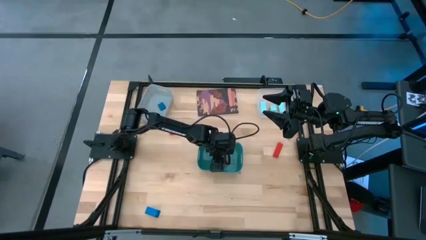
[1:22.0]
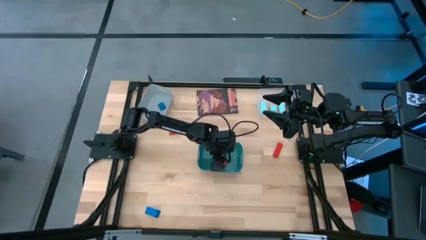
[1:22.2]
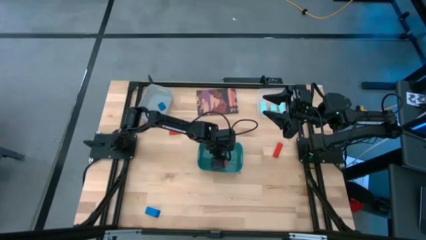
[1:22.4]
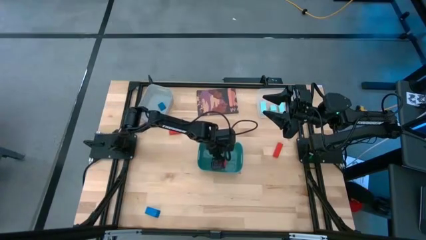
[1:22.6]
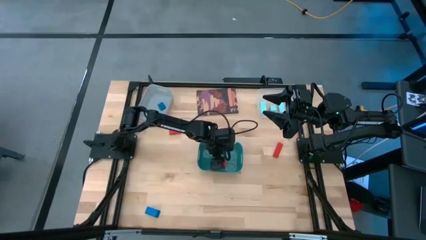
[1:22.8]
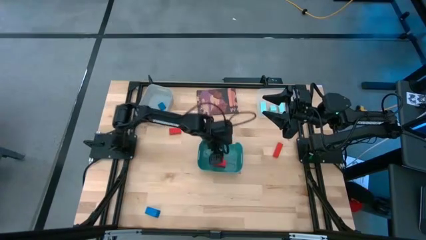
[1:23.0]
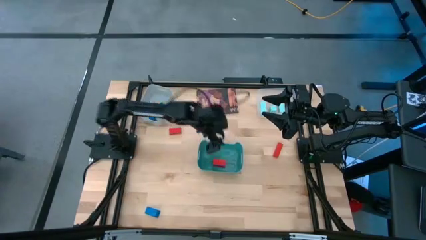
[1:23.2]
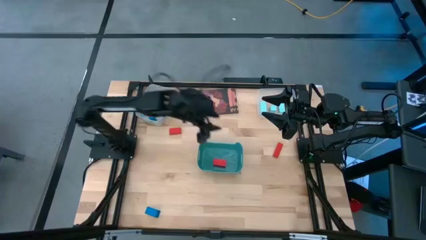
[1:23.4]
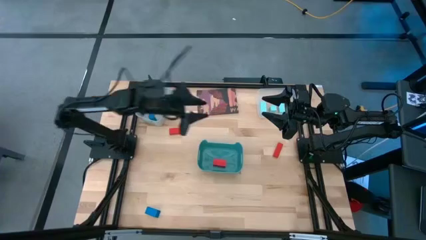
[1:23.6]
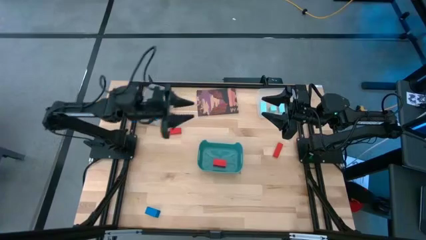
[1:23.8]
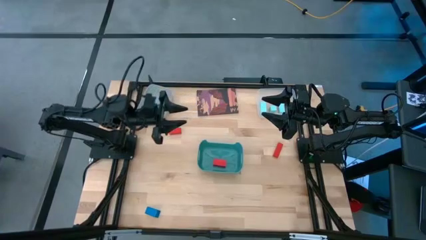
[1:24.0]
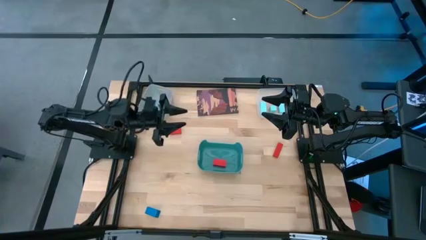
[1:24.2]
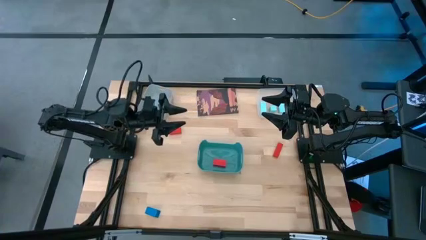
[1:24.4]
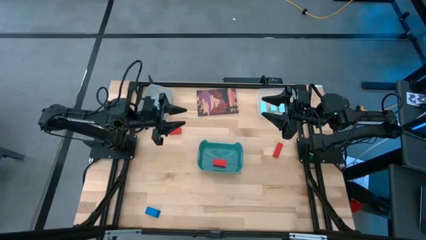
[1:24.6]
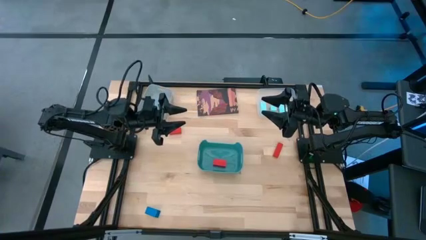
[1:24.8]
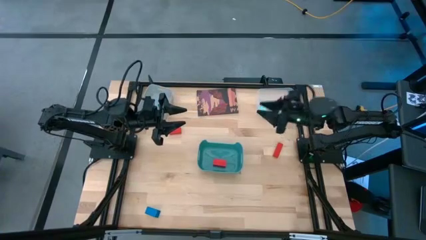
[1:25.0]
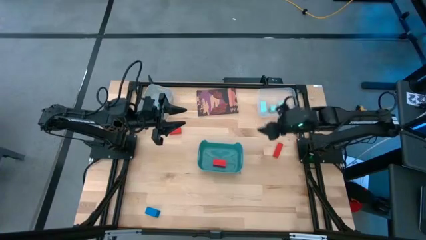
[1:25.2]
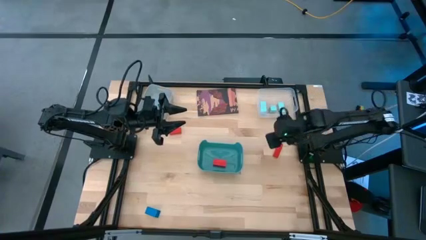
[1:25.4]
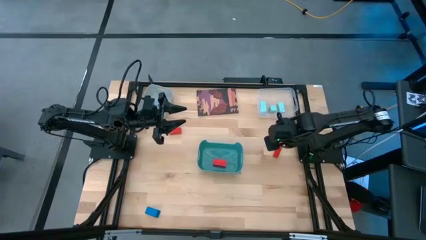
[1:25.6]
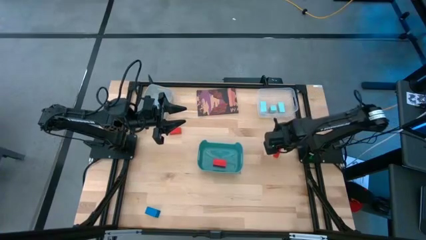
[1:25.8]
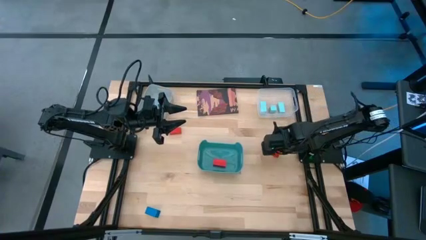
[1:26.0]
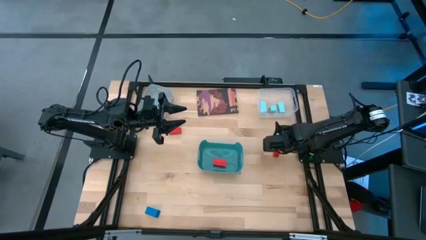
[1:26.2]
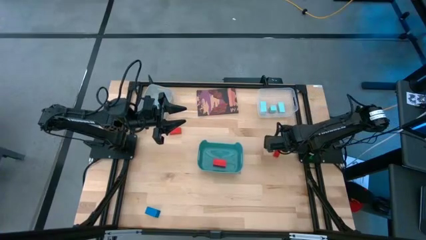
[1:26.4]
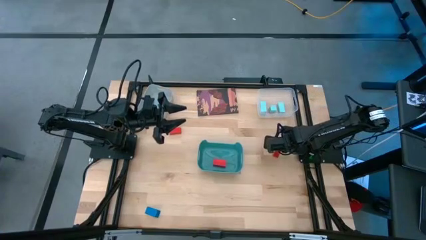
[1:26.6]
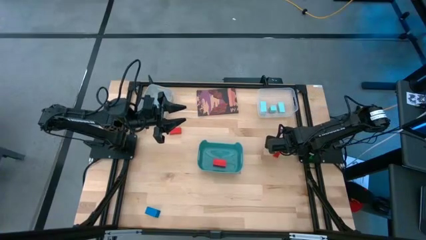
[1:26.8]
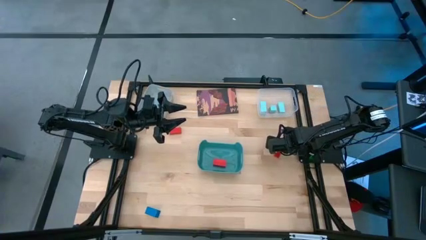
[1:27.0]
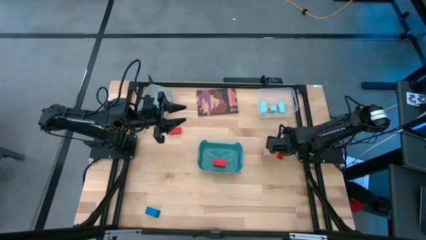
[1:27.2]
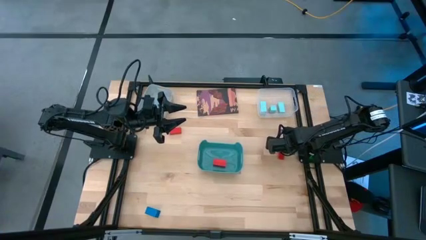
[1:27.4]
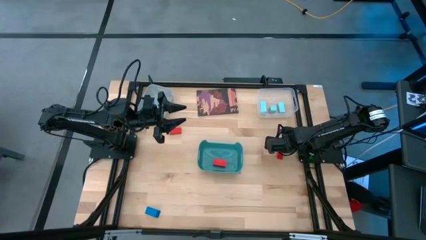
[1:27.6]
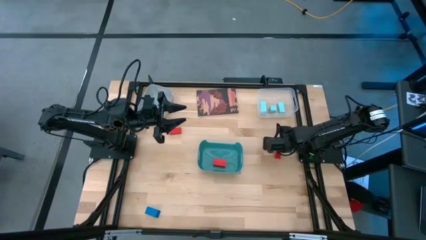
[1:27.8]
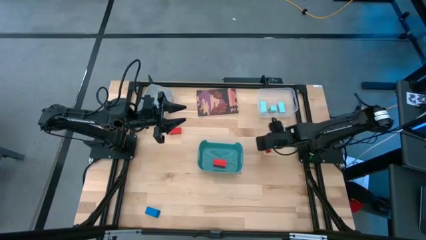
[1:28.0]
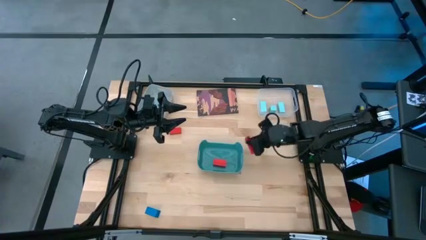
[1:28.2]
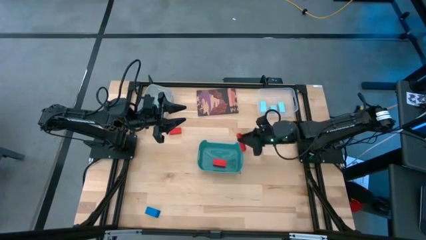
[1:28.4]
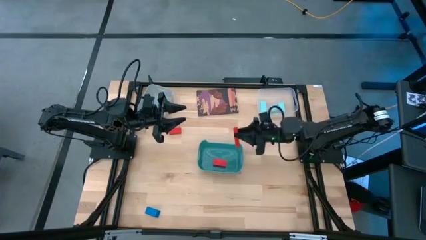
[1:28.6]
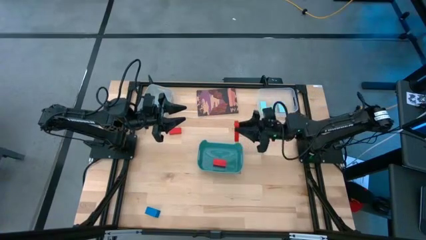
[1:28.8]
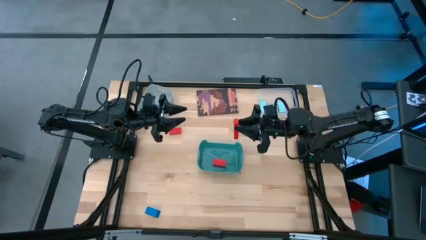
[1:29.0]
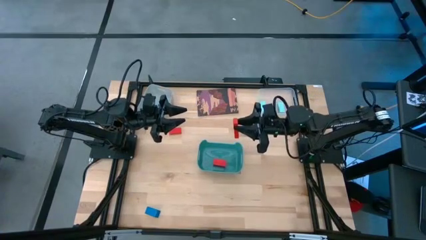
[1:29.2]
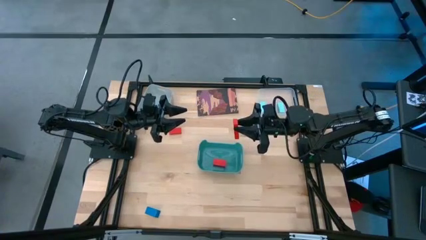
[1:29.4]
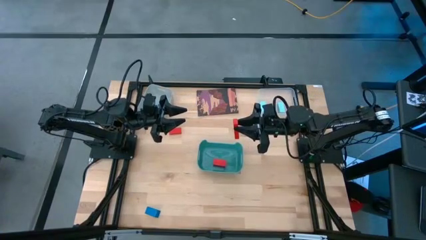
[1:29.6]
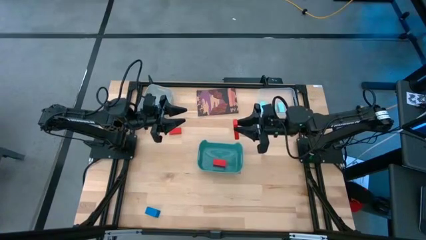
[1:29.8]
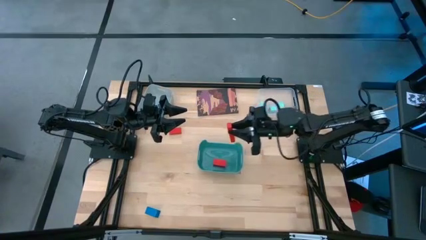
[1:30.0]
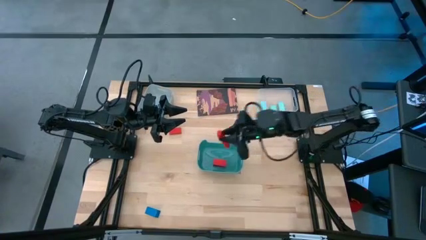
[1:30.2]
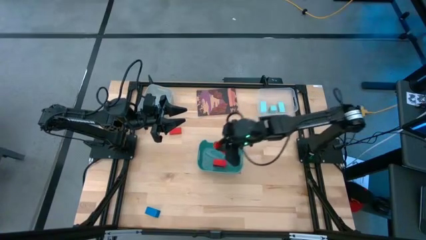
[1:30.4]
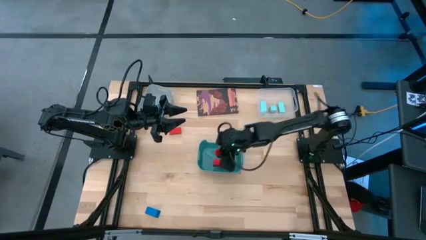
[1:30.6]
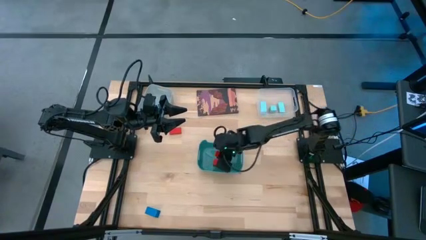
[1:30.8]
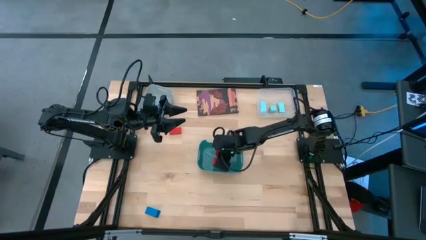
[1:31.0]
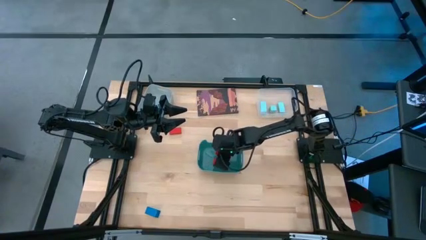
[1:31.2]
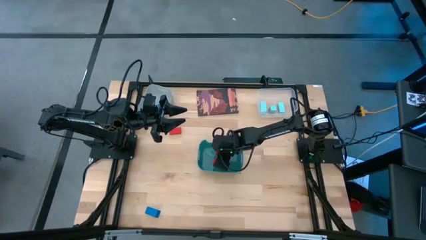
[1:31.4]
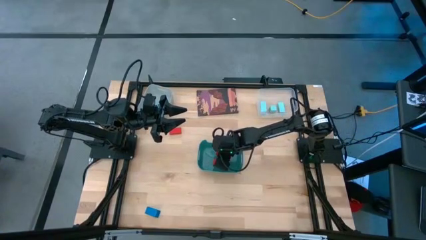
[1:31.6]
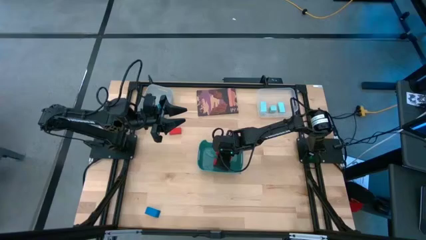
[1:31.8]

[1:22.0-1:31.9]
Task: Sort & place blocks by color
Put the rectangular orange block into the blue green bin

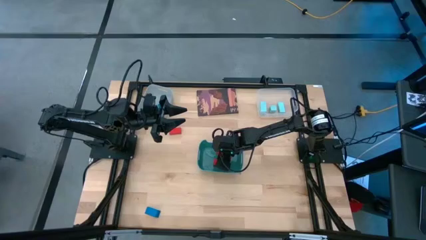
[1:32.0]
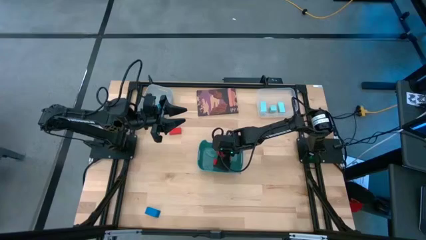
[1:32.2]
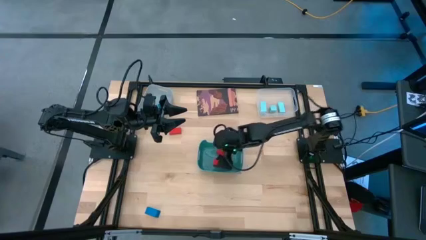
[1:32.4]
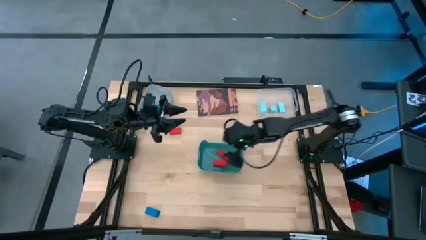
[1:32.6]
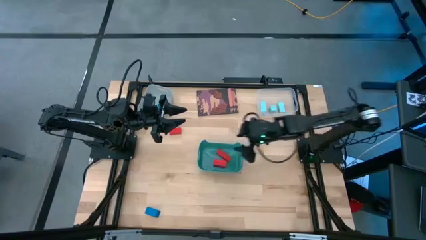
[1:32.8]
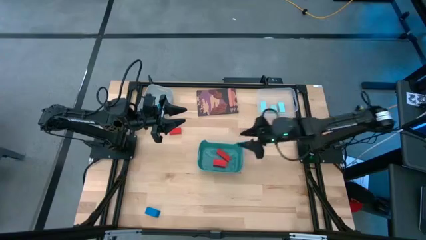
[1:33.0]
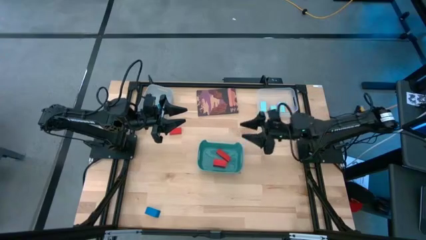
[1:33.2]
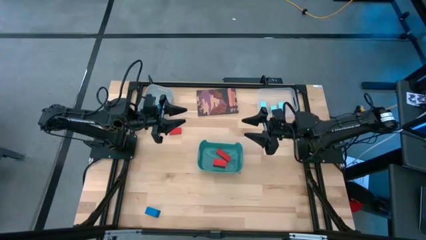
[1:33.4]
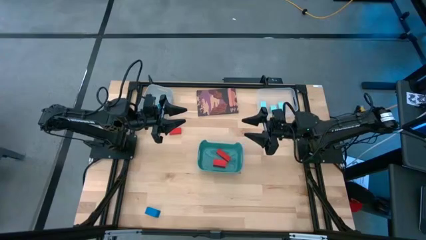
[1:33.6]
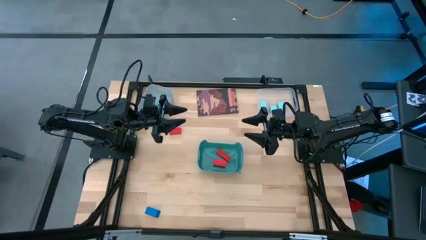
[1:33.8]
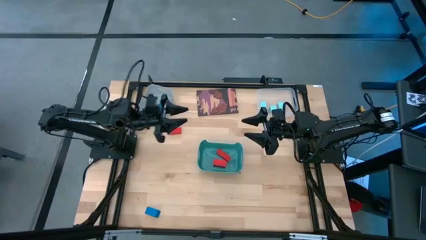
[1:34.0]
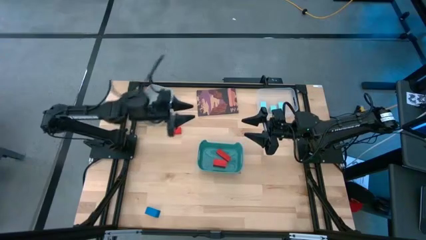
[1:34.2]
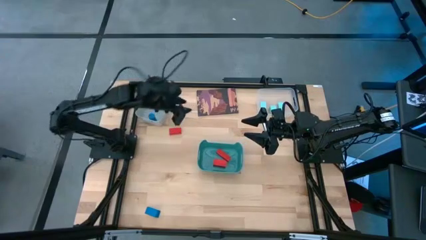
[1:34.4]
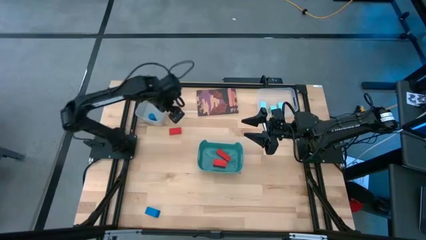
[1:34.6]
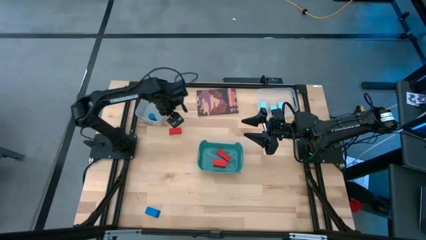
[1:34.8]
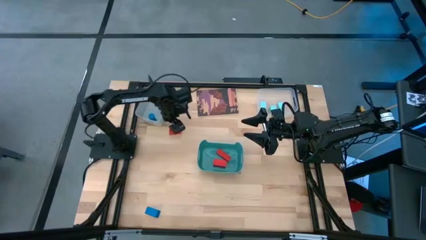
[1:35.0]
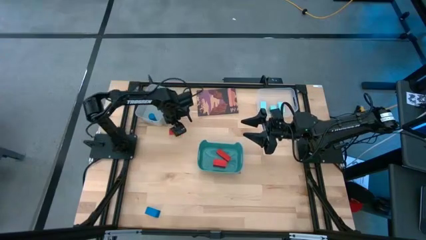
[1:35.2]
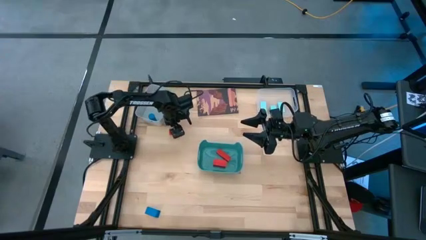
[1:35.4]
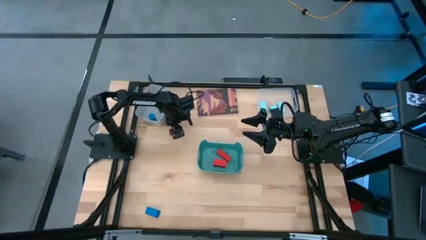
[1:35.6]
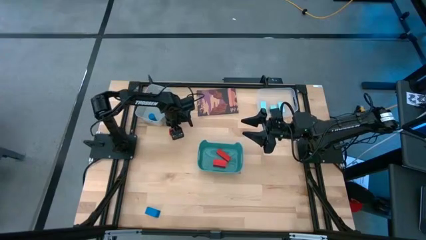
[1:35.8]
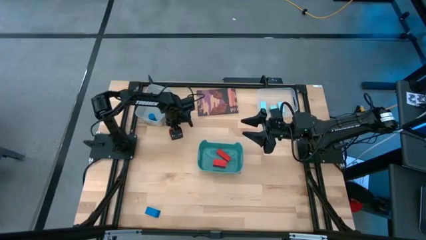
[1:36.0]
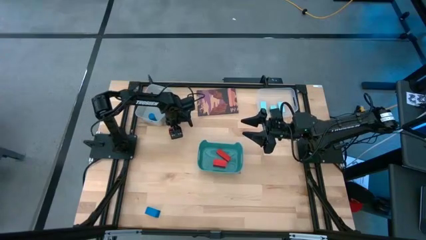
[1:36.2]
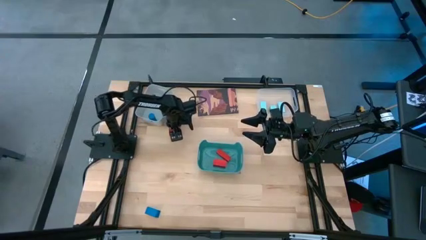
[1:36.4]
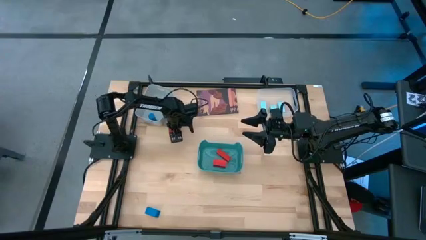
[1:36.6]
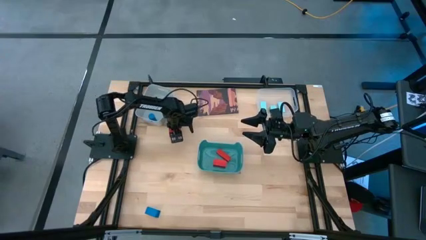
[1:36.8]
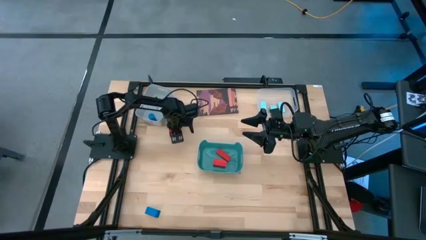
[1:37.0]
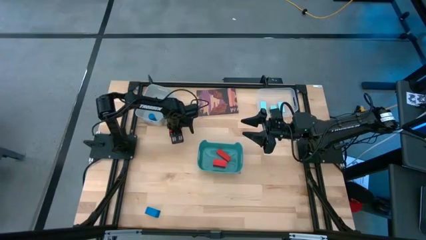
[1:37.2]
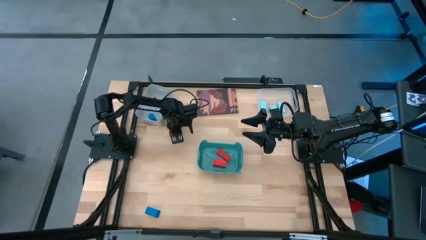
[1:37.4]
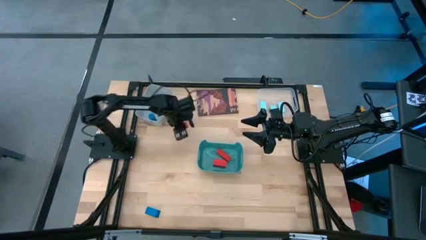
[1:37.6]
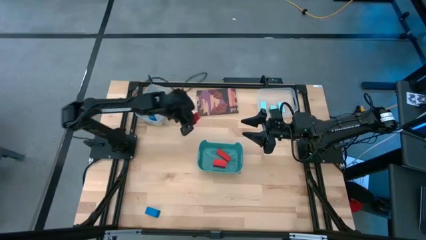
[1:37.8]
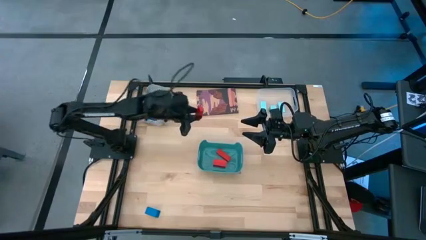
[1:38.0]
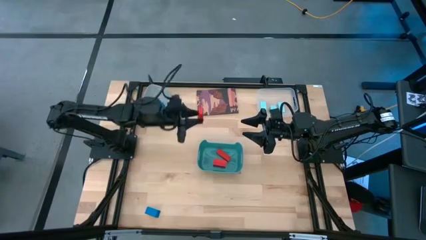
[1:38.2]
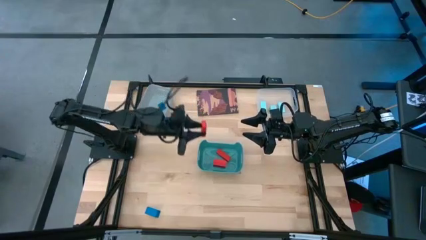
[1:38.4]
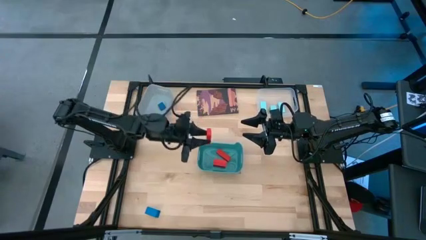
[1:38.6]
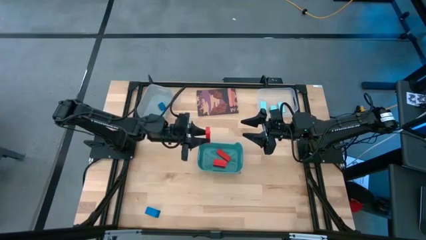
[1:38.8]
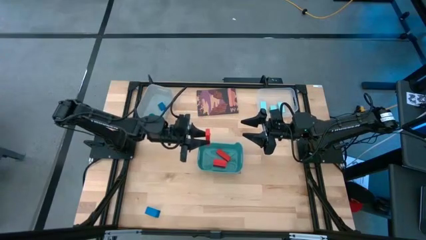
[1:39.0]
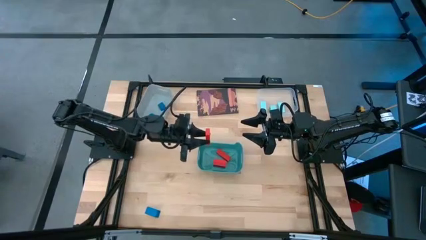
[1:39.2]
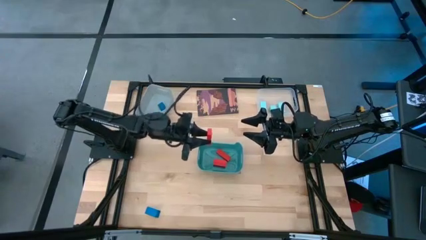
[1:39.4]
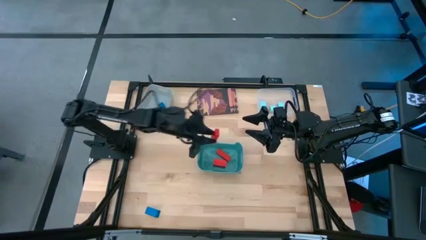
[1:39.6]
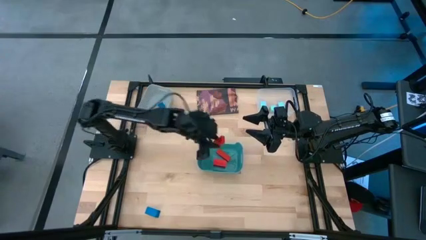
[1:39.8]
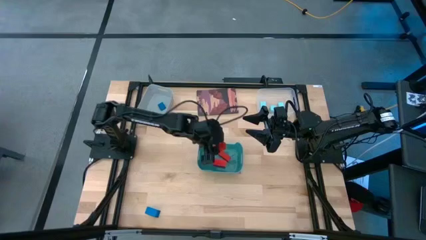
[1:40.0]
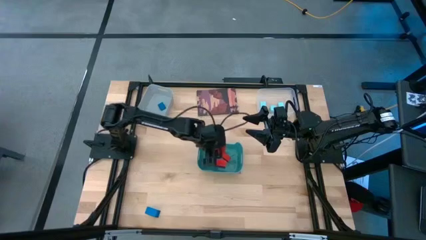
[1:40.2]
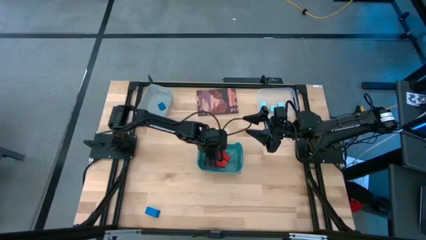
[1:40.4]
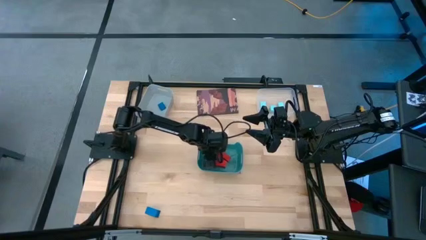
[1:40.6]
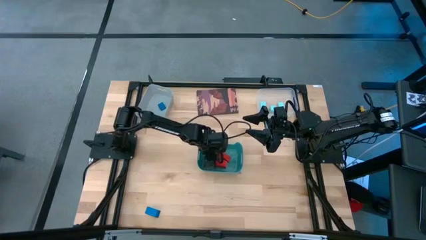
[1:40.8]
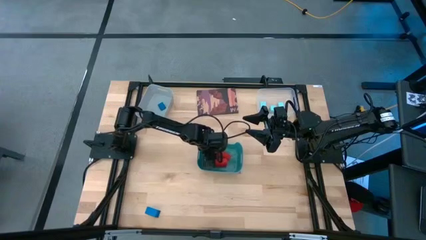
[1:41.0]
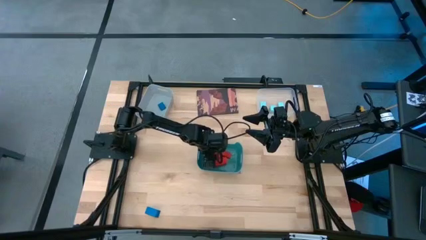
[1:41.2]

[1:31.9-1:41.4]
Put the square orange block into the blue green bin
